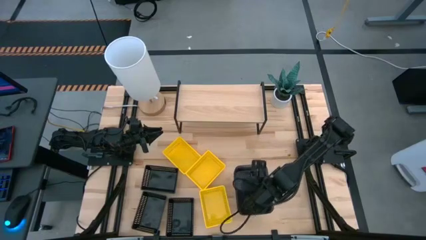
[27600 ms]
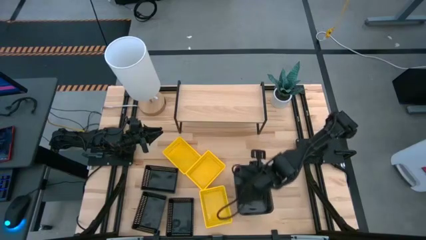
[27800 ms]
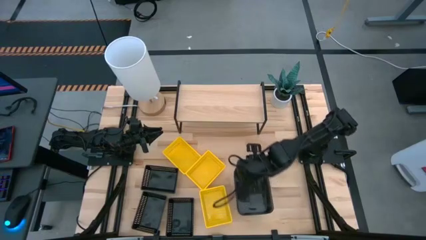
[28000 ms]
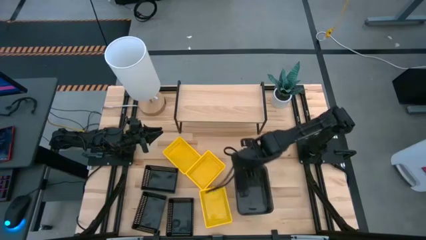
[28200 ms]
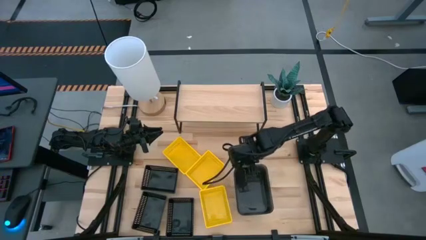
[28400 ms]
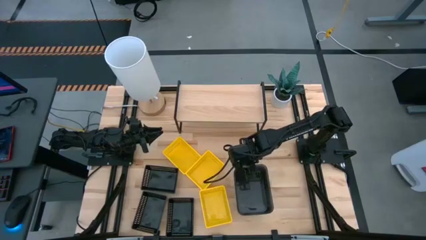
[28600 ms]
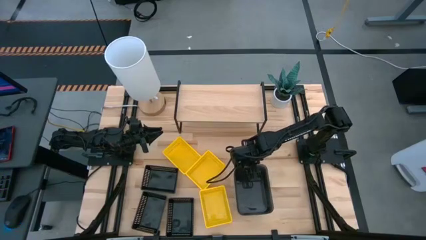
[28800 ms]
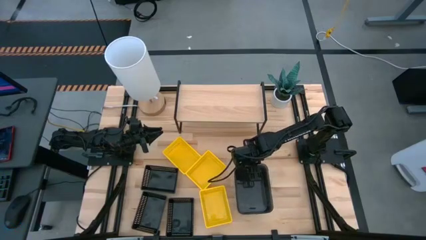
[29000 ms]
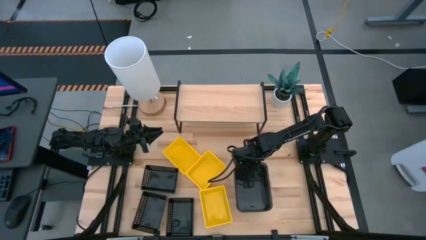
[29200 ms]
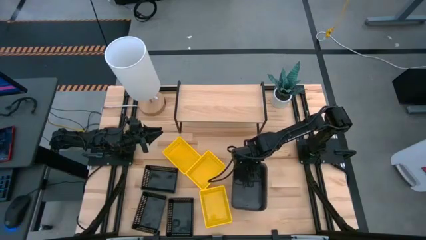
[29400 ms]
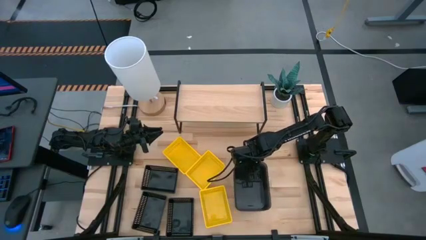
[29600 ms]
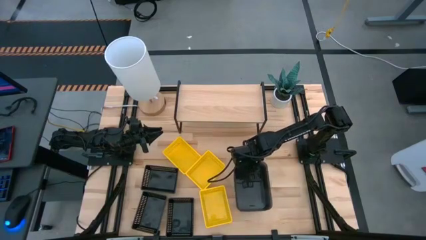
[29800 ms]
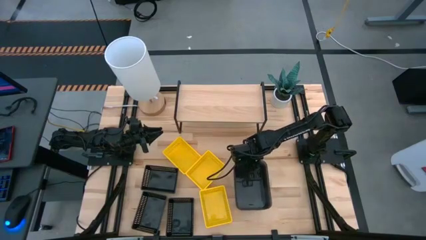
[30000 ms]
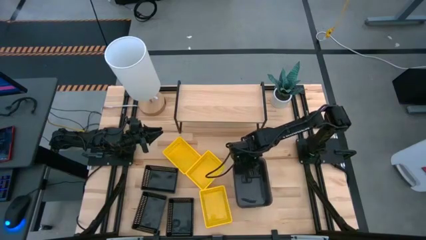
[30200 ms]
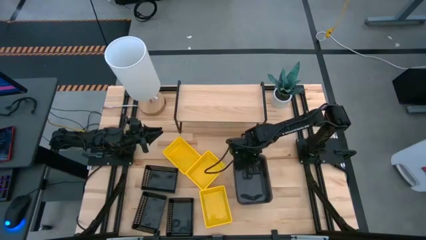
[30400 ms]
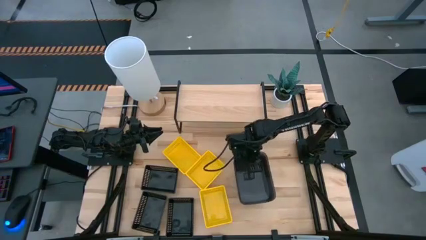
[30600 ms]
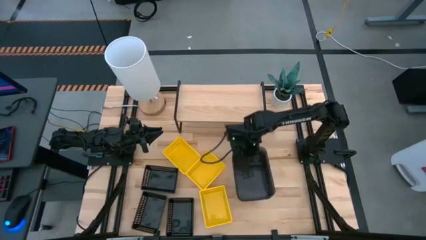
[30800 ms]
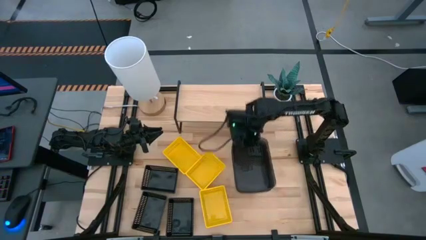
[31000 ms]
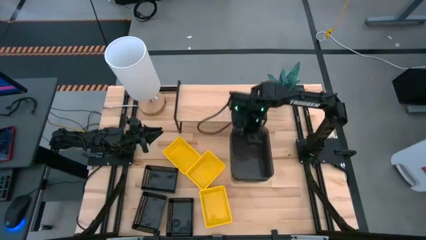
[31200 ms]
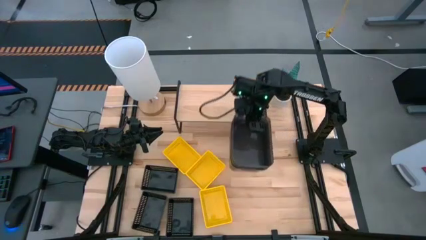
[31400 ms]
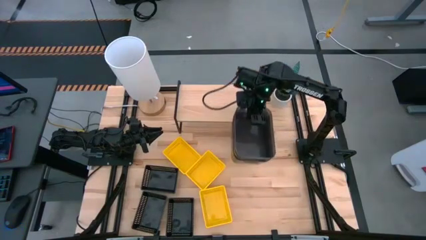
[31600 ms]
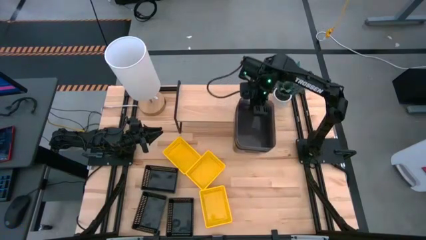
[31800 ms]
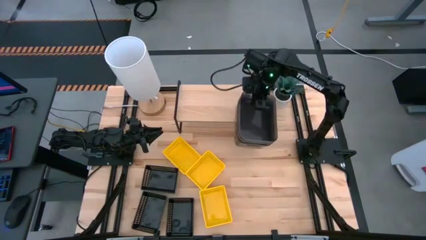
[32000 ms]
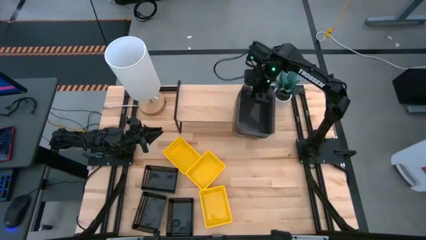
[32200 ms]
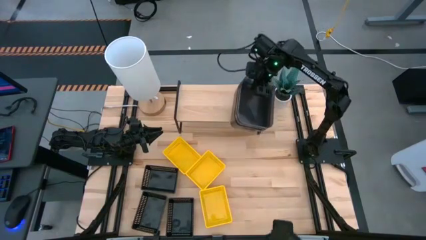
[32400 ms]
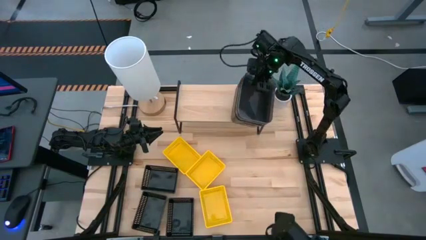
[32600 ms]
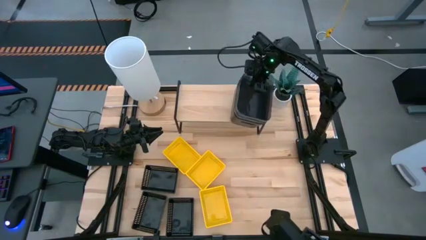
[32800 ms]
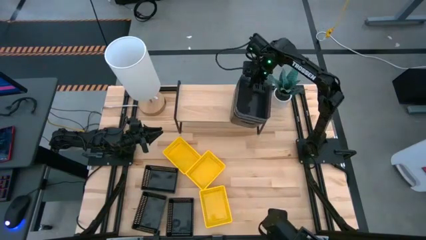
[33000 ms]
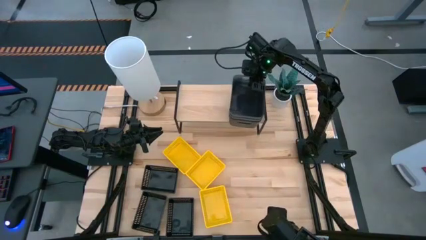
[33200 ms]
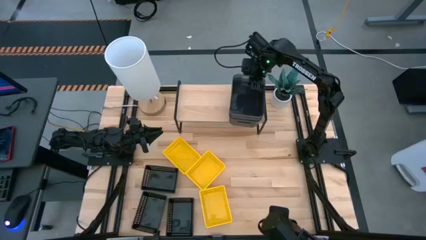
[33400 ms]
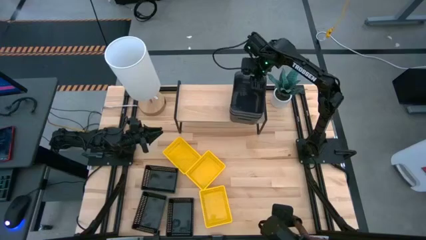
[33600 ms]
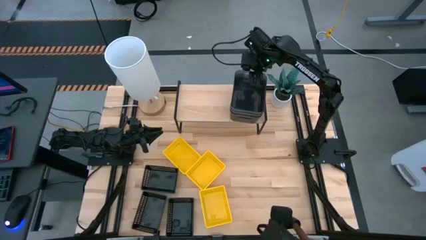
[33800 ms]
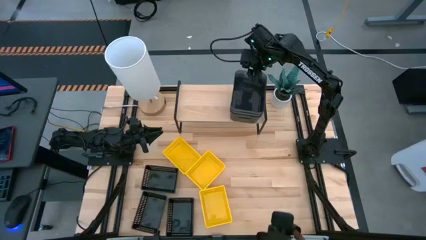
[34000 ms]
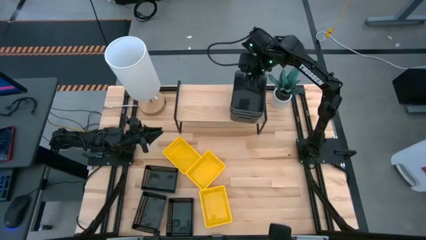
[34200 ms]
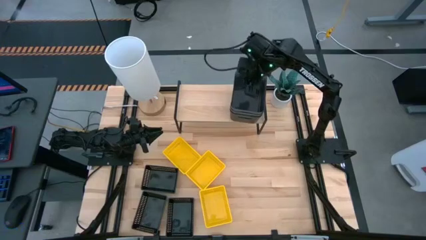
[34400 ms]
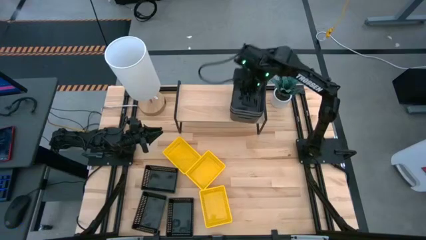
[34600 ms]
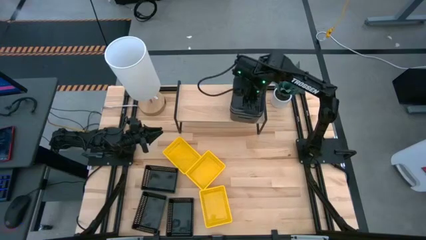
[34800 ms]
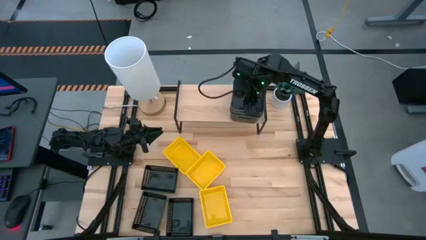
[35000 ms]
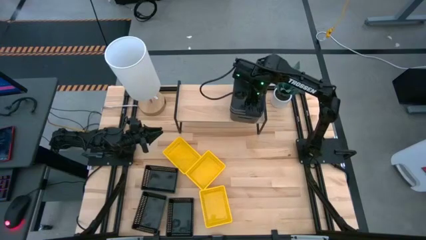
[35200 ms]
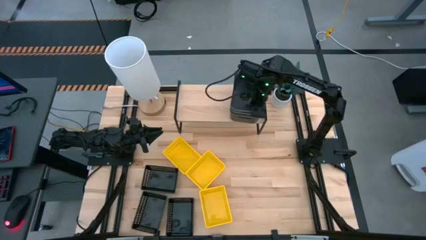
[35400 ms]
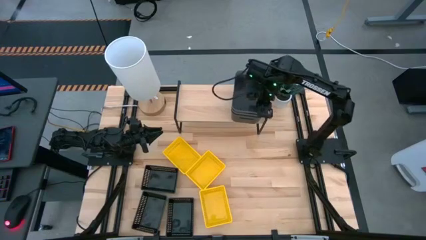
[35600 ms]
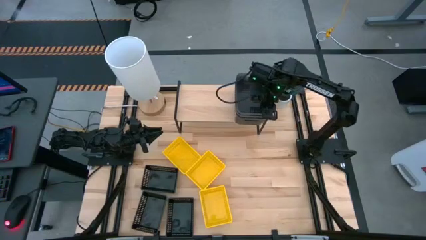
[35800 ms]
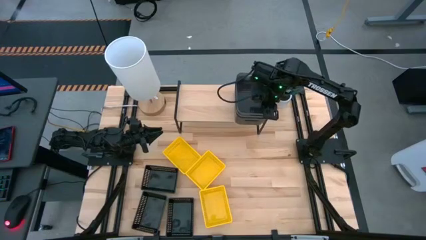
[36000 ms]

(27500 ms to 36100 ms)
Task: Stack baskets on shelf by color
Put the stacked transparent black bins on the shelf

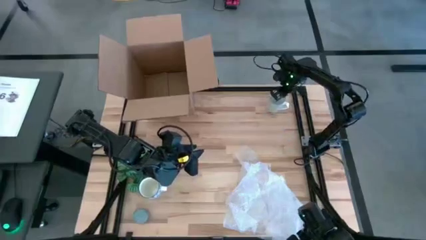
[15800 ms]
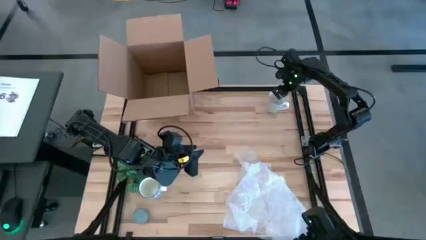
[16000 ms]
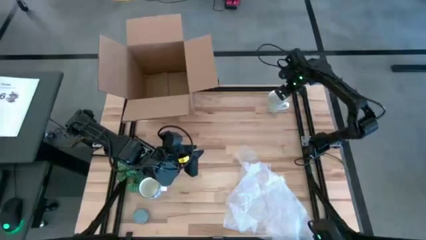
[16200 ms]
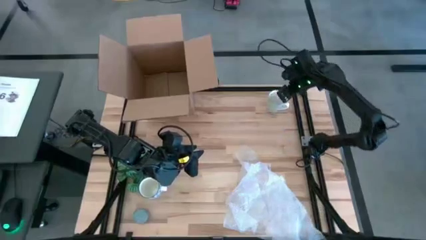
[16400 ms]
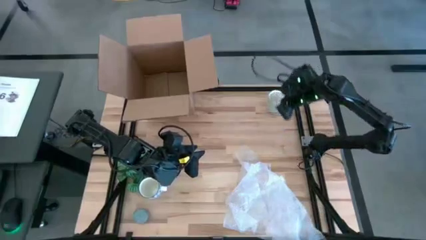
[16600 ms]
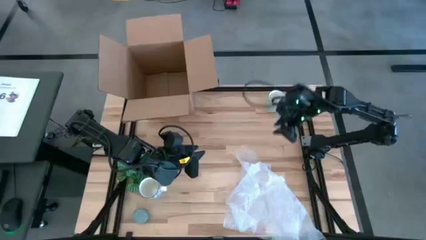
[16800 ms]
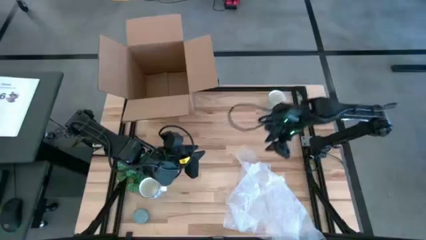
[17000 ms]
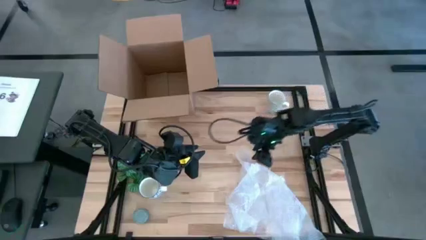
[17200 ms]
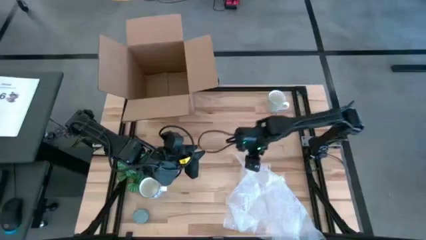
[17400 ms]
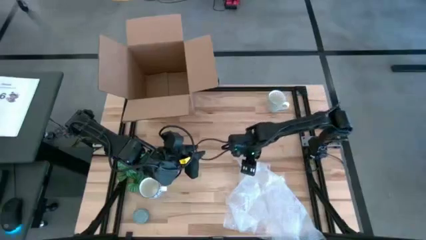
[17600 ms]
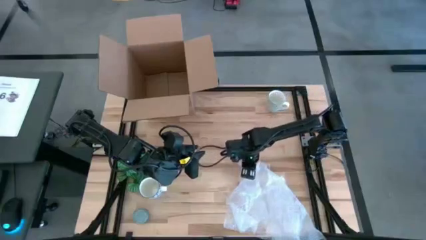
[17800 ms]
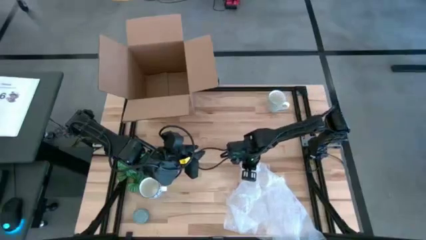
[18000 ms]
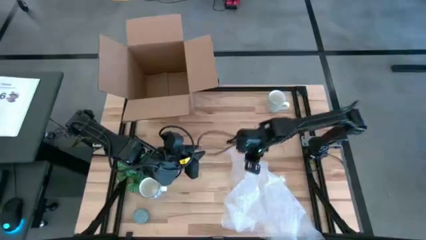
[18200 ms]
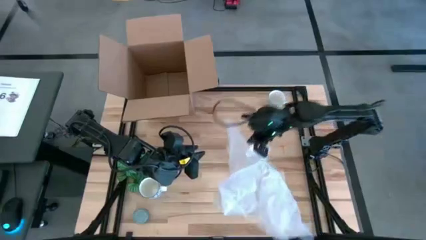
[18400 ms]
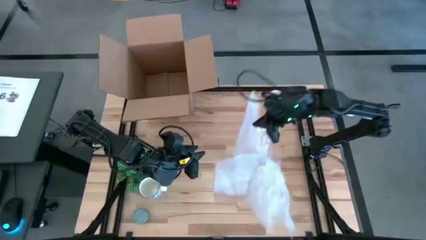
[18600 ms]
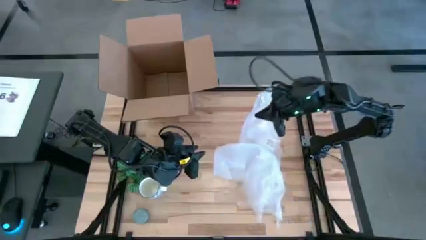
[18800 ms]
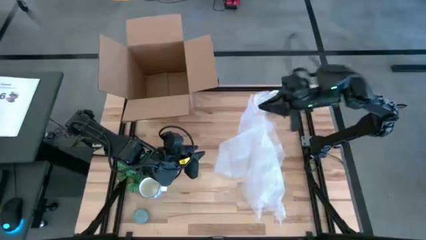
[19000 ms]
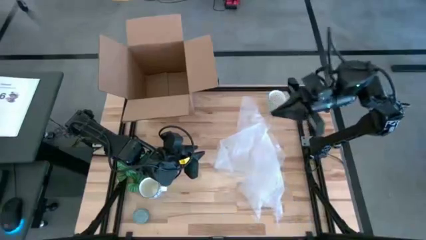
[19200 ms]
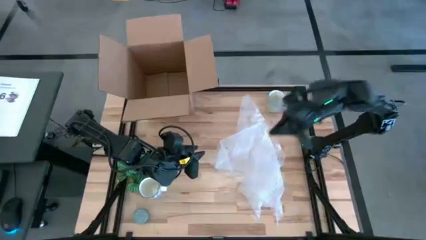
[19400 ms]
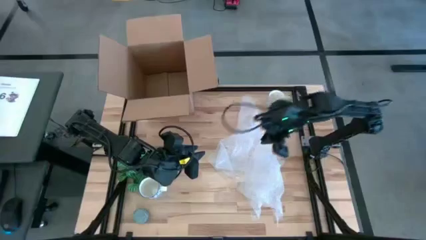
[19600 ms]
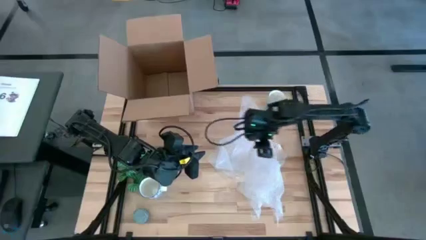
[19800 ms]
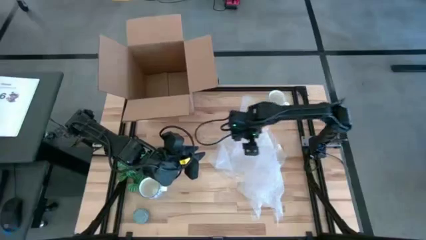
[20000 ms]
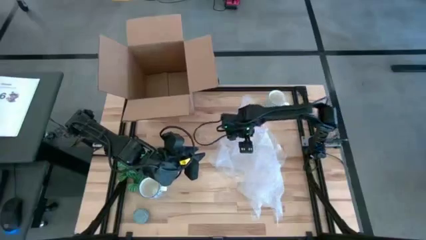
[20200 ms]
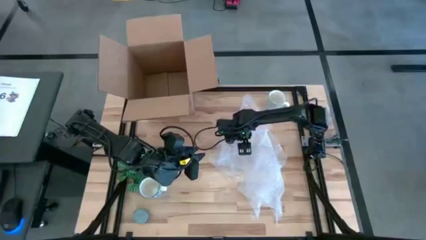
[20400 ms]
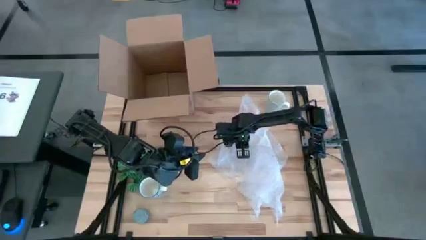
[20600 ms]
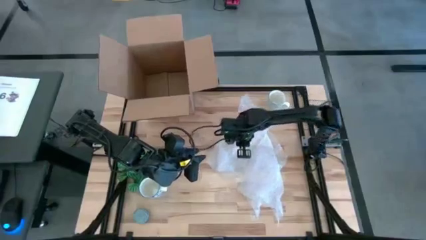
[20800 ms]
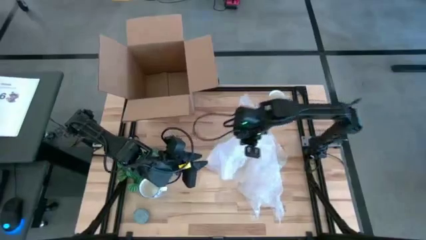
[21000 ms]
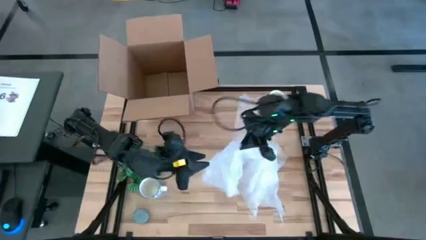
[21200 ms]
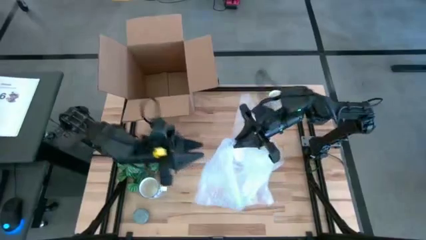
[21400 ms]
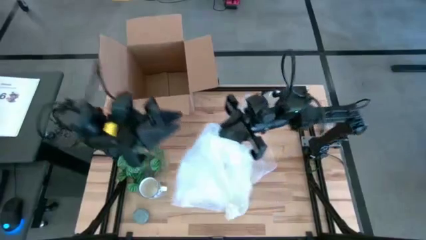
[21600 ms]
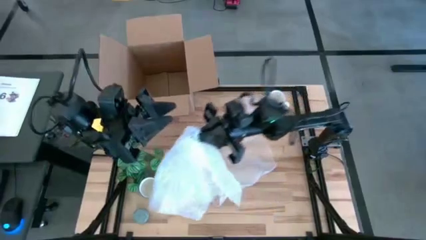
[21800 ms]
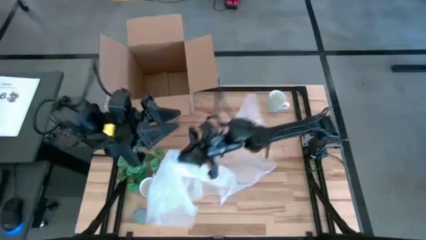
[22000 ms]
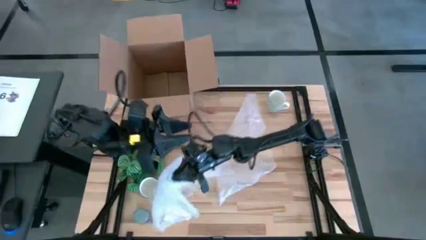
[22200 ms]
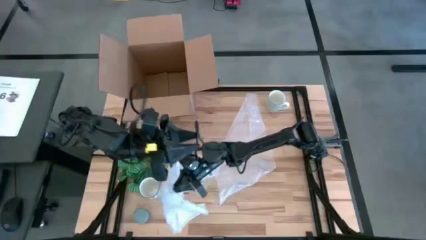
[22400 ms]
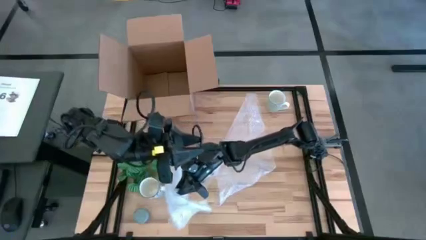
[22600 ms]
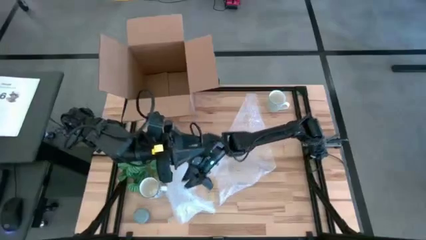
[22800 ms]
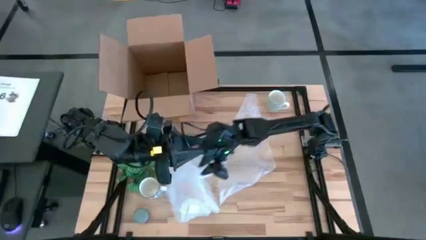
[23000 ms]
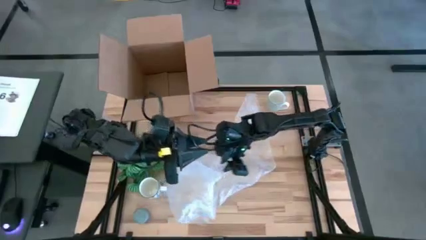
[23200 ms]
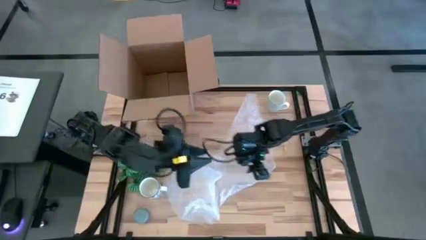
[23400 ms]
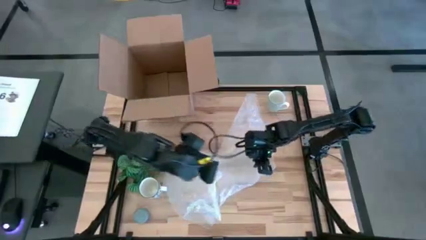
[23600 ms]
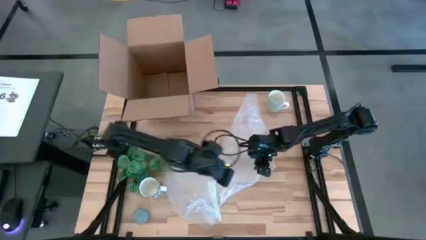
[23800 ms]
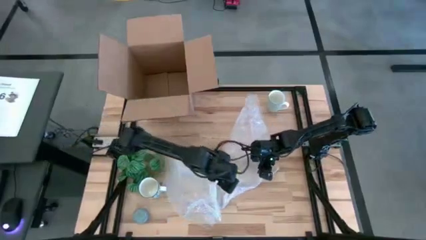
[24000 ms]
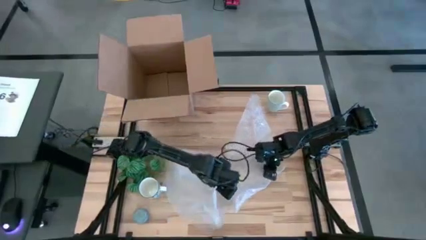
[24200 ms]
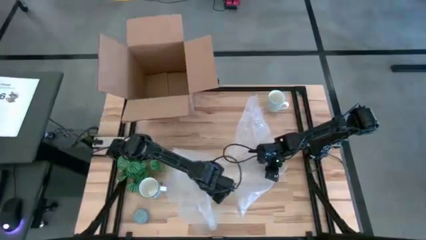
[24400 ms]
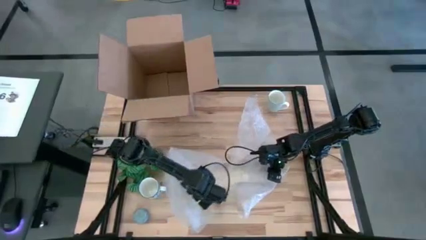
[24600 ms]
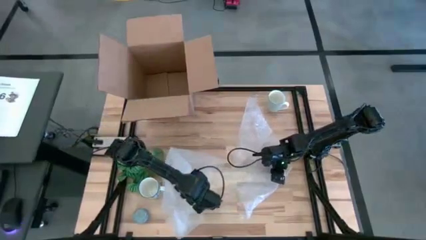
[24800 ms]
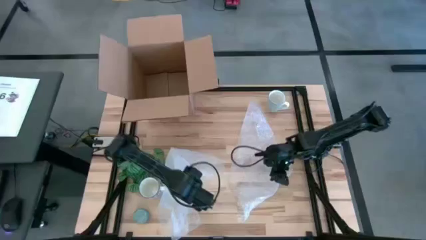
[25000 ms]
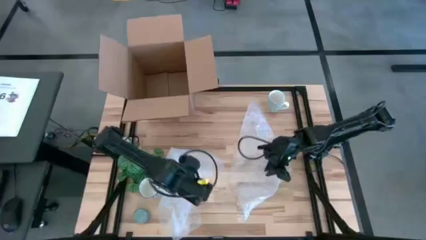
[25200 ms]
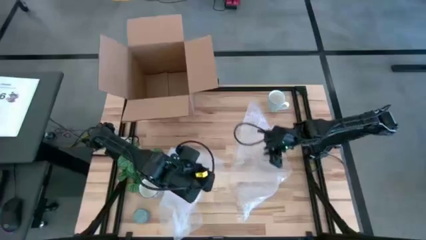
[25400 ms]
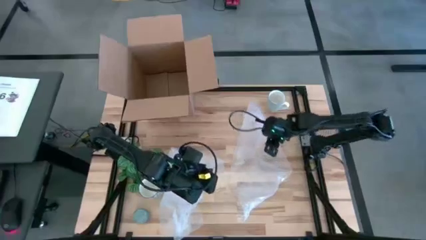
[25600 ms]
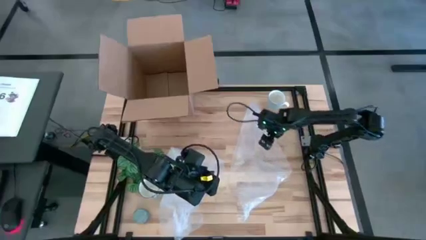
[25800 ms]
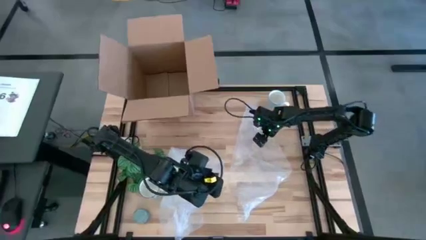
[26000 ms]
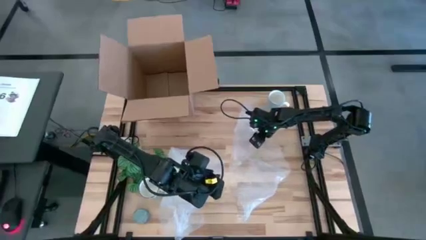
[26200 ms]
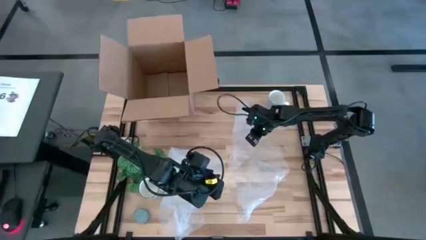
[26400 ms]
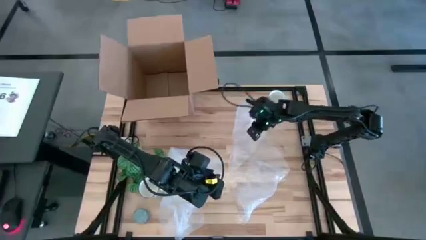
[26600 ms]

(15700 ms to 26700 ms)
Task: wrap mug
Prepare the bubble wrap
